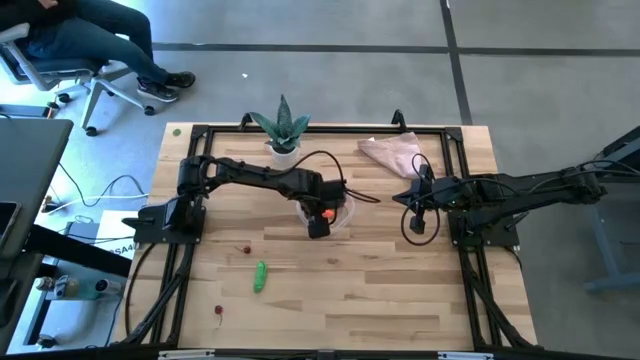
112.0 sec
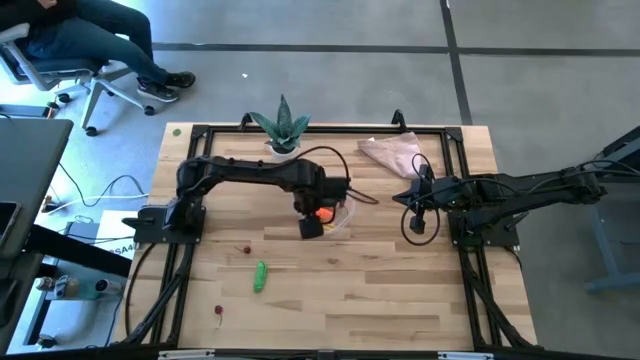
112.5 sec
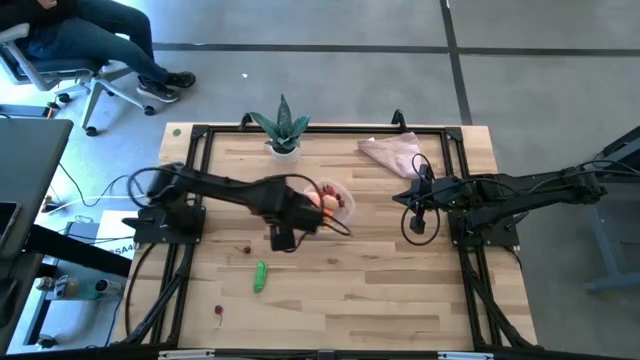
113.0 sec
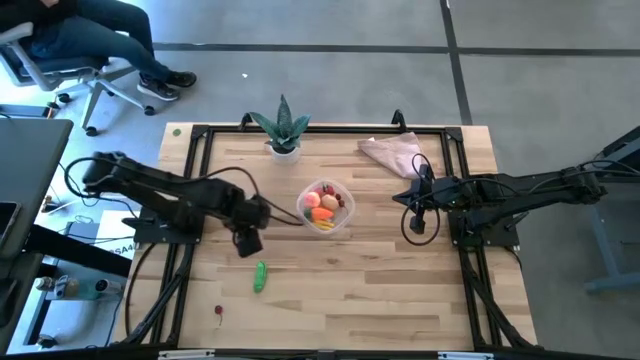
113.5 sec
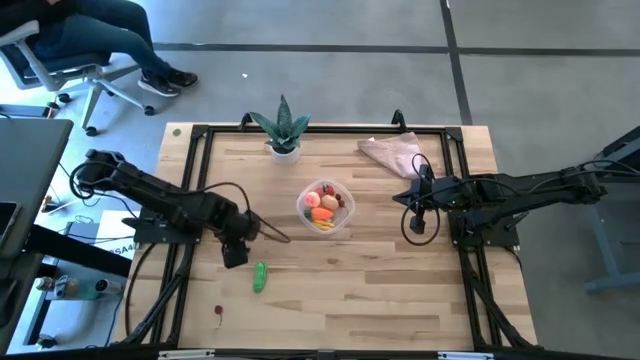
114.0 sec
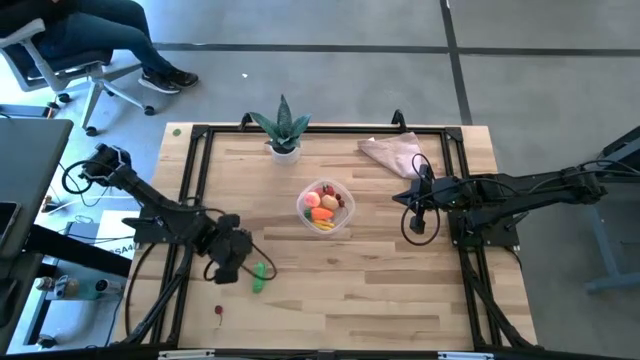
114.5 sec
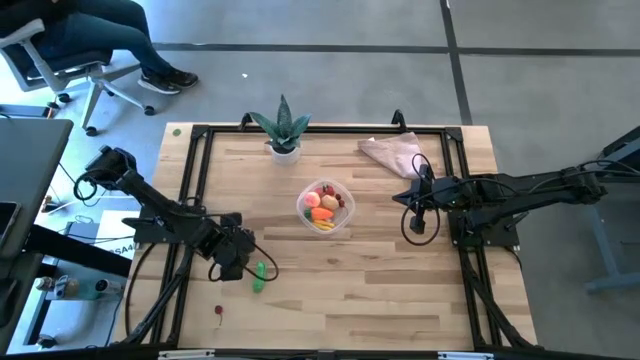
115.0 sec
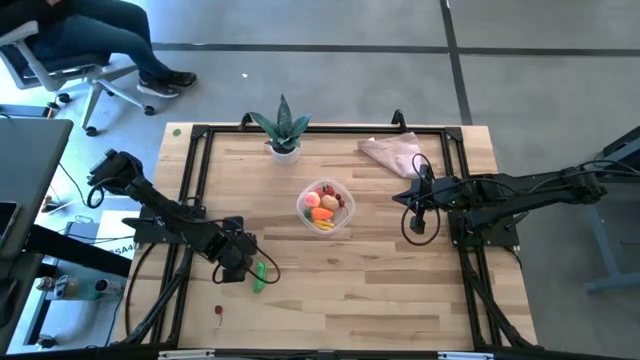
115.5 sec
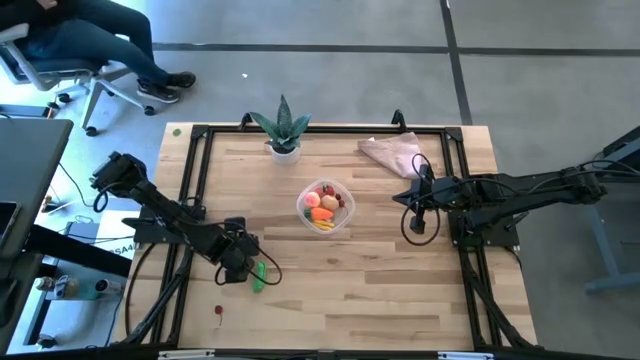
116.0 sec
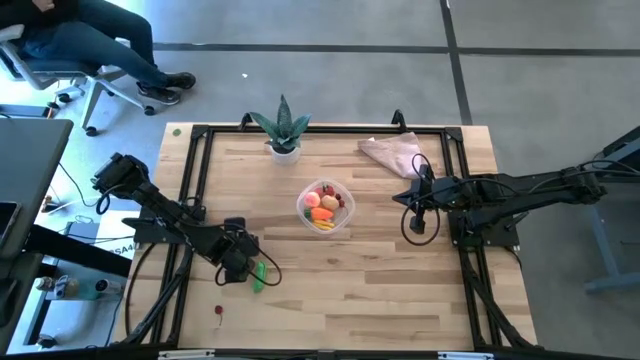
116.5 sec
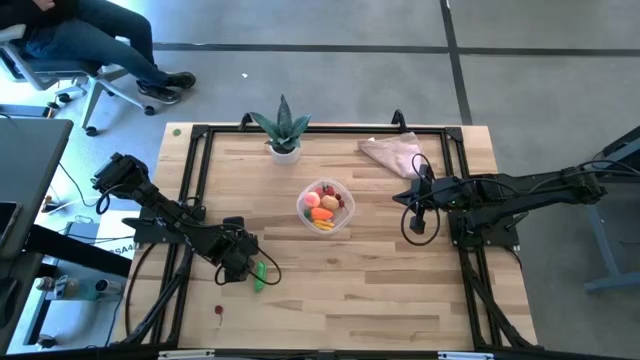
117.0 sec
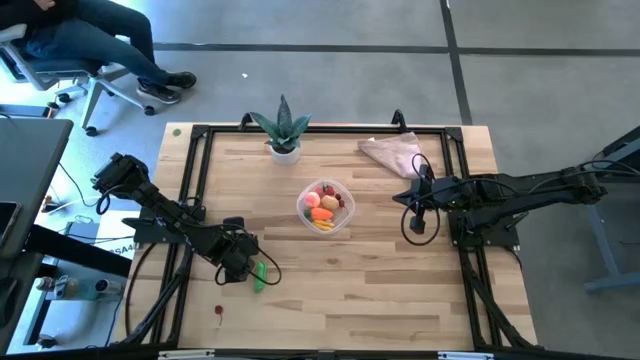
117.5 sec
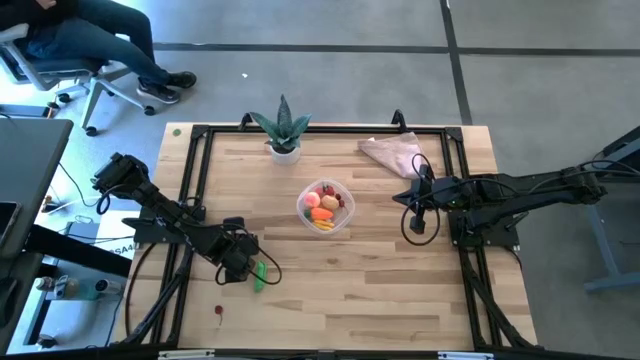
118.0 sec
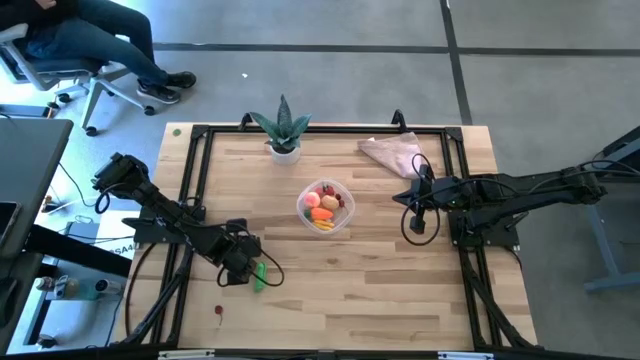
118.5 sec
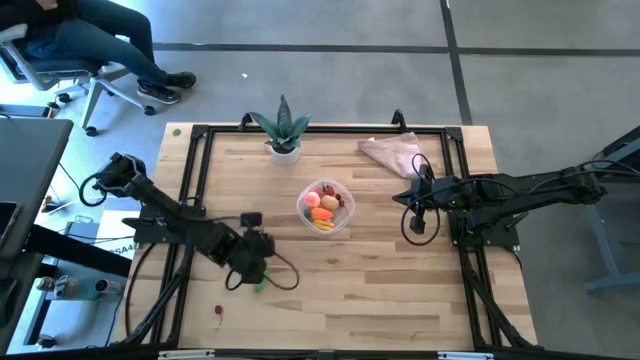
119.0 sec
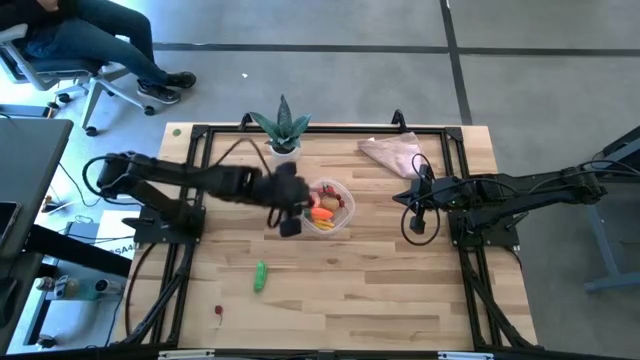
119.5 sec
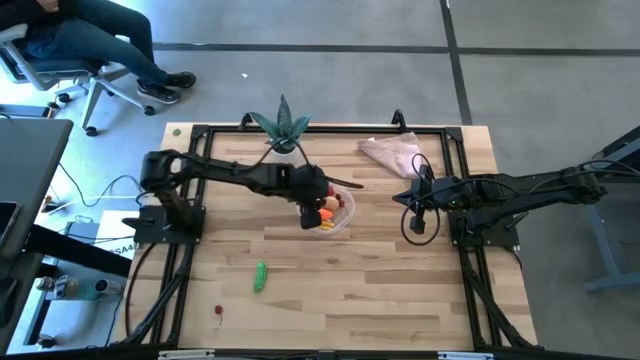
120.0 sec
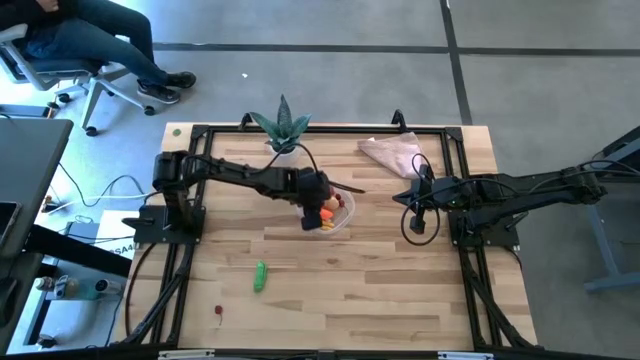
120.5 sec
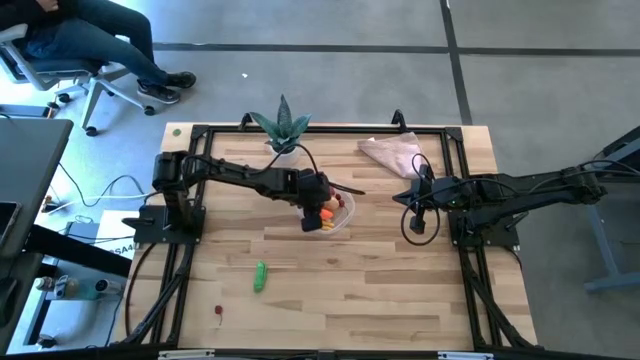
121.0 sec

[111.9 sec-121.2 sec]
Task: Pick and placing Produce into tupperware
Put the red cherry into the transparent bin

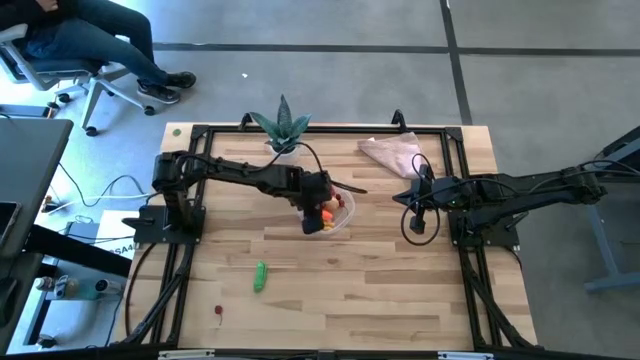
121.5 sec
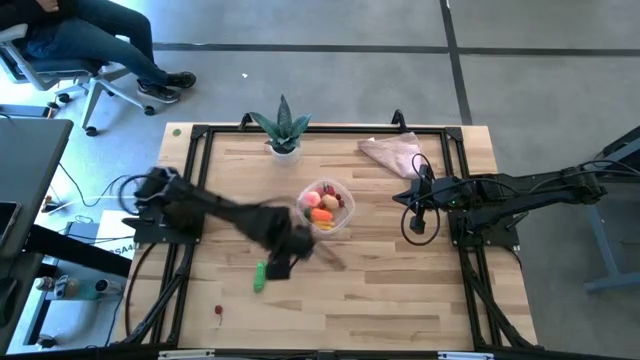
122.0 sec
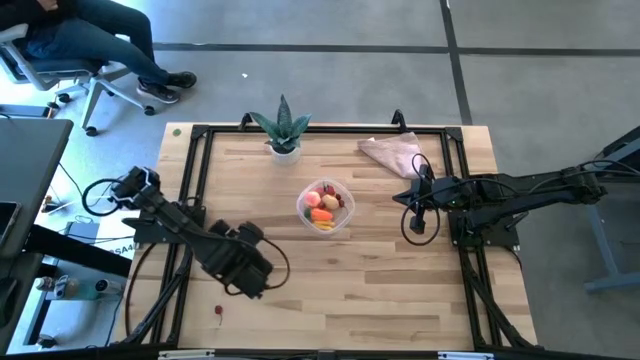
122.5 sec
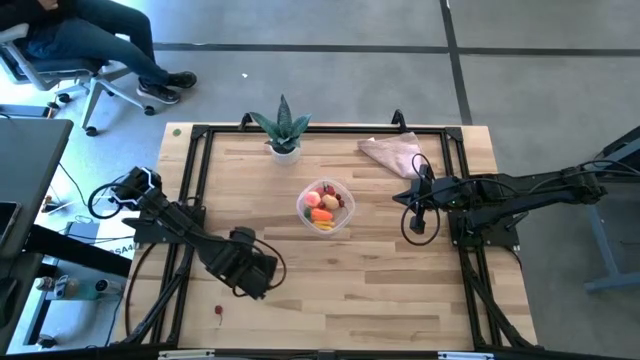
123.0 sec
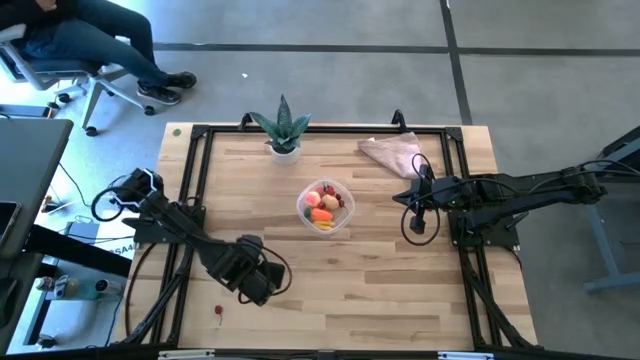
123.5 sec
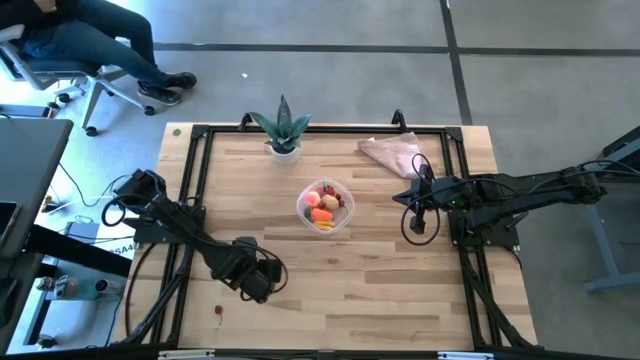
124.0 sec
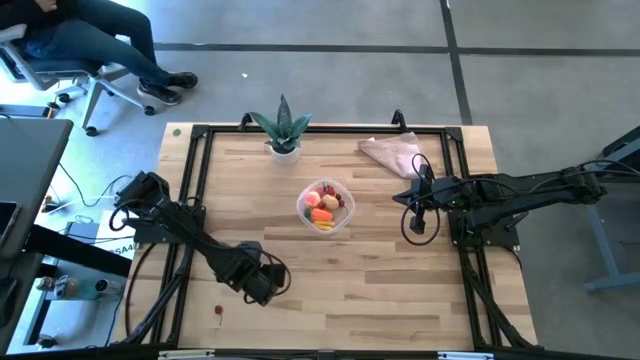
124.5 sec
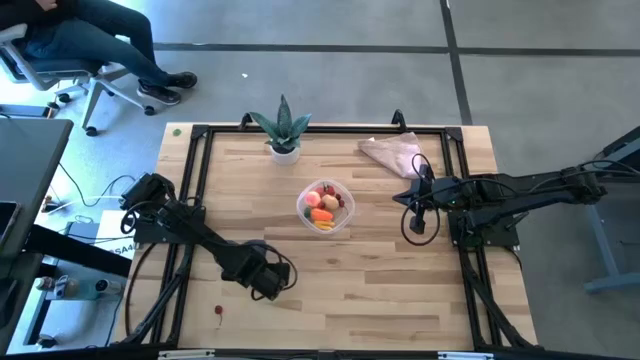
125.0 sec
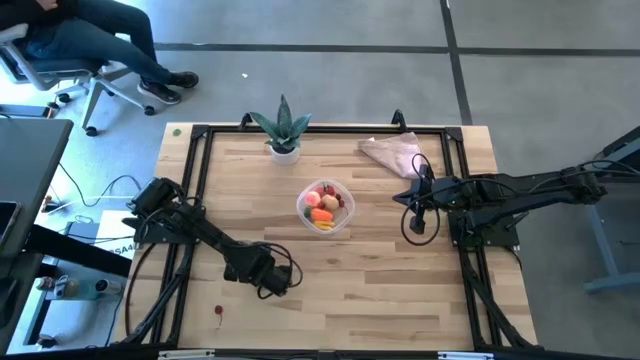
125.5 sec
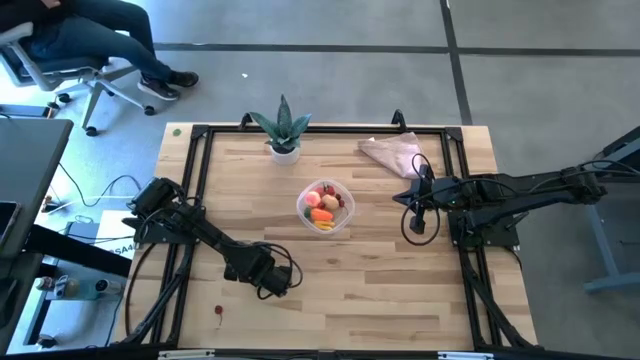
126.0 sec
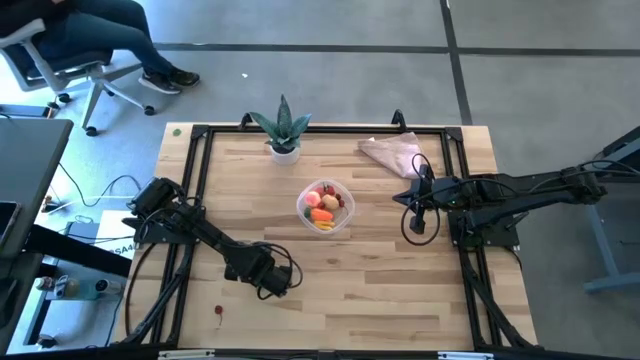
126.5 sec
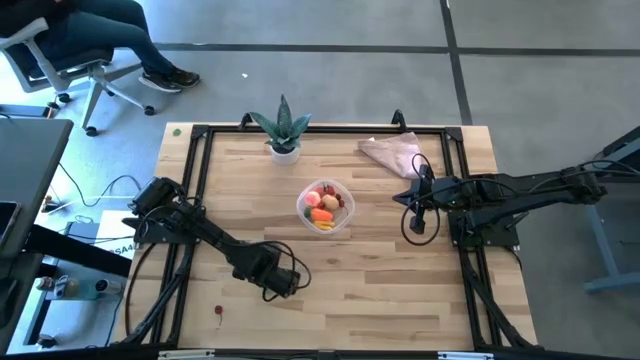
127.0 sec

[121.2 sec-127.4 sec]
Put the green pea into the transparent bin

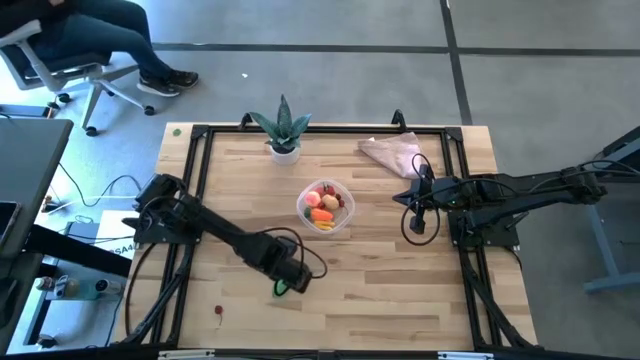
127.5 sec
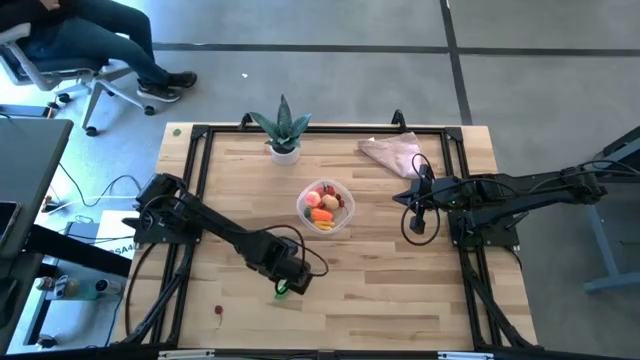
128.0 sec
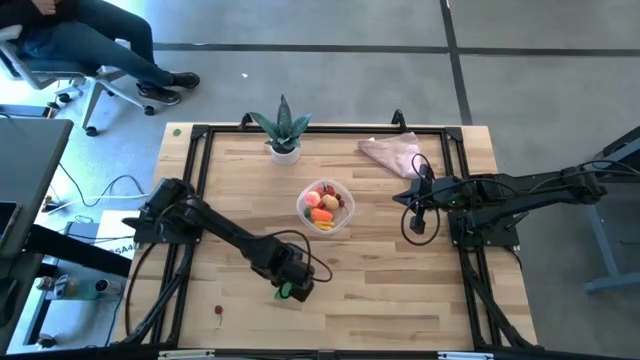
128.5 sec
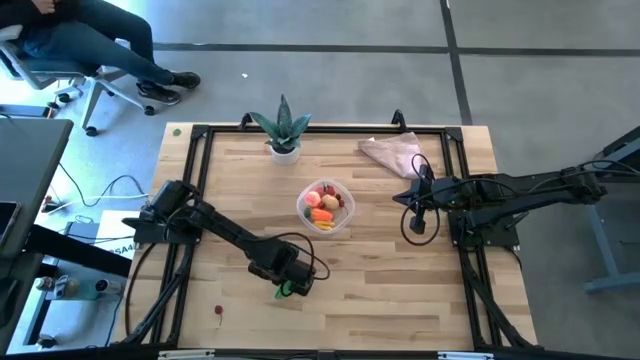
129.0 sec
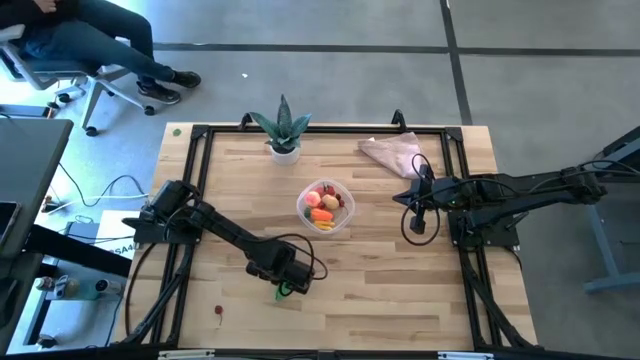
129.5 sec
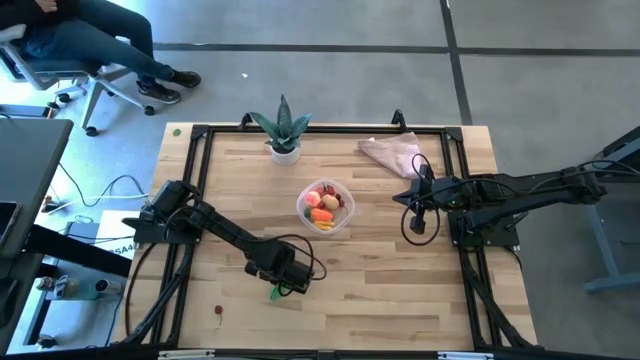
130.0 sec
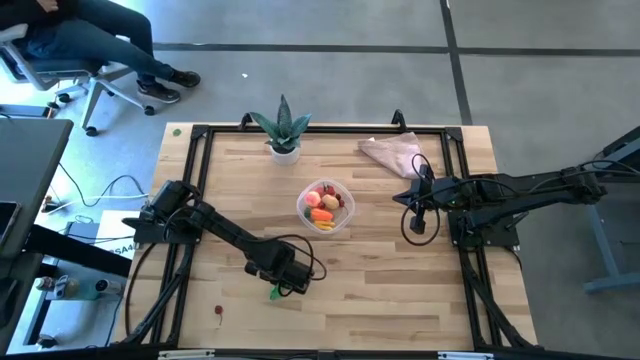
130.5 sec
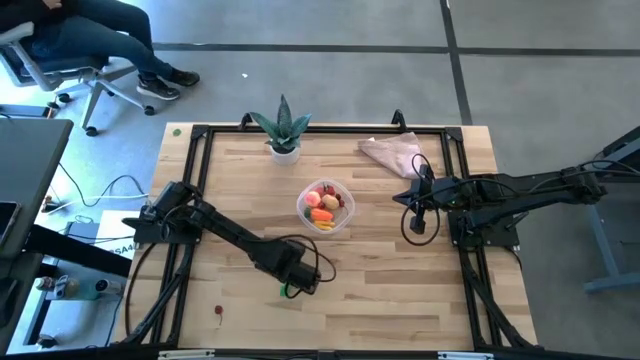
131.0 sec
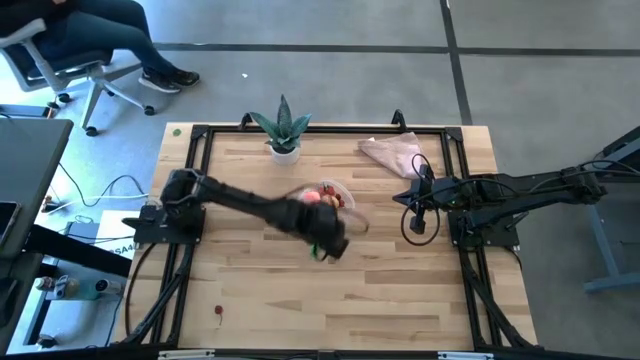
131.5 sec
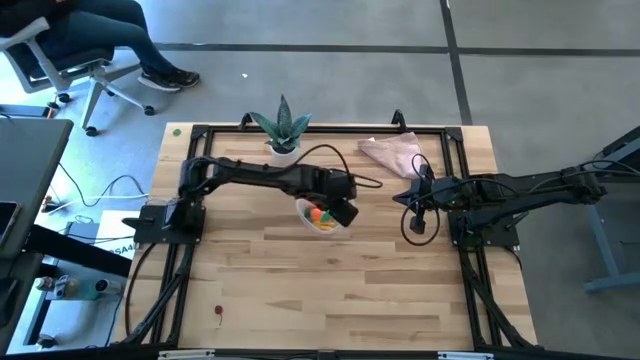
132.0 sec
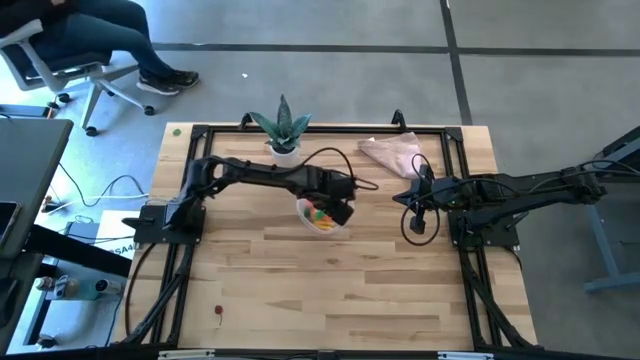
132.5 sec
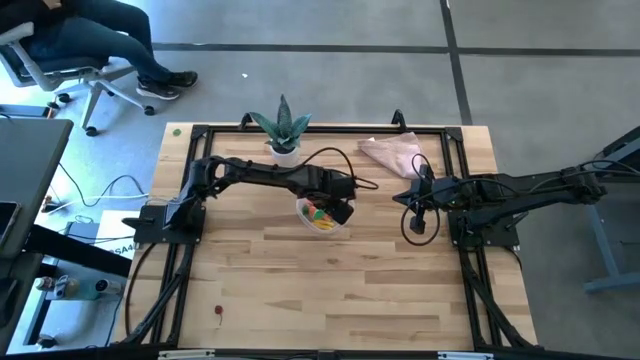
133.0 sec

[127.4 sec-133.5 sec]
Put the green pea into the transparent bin
